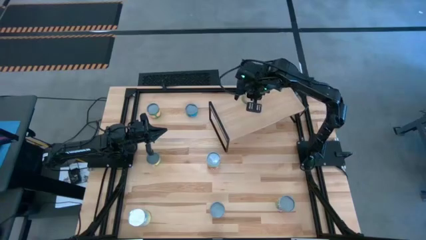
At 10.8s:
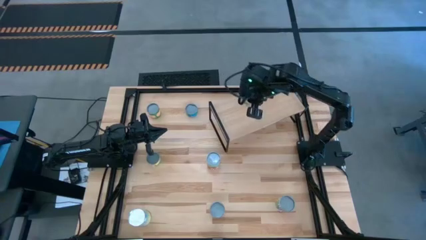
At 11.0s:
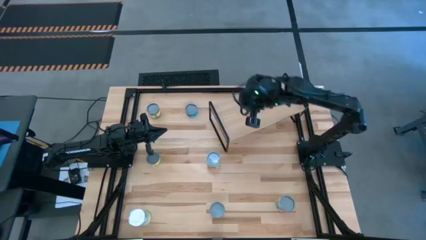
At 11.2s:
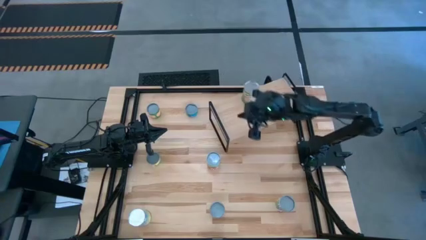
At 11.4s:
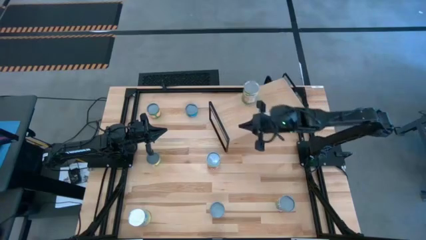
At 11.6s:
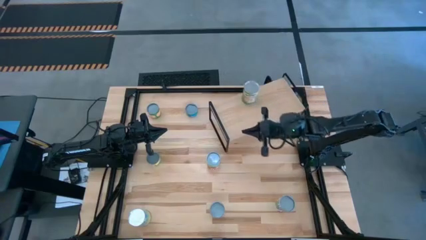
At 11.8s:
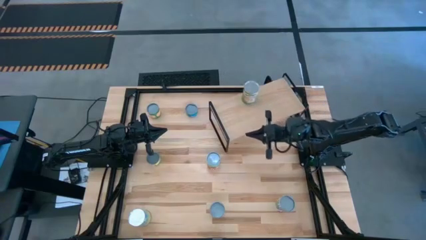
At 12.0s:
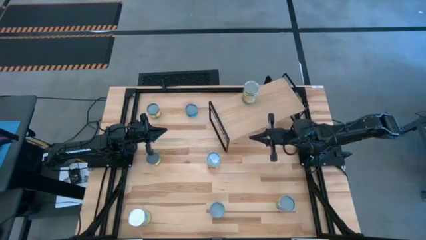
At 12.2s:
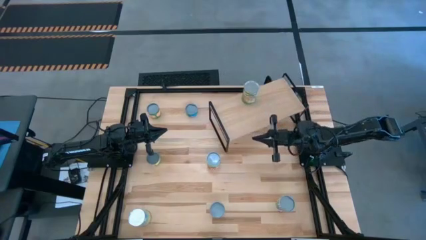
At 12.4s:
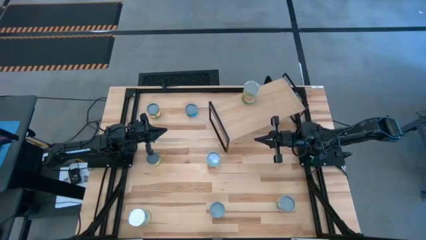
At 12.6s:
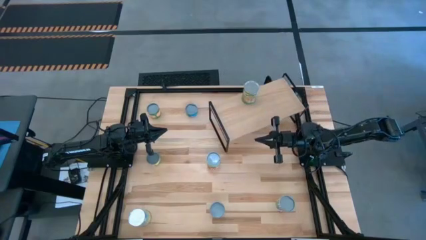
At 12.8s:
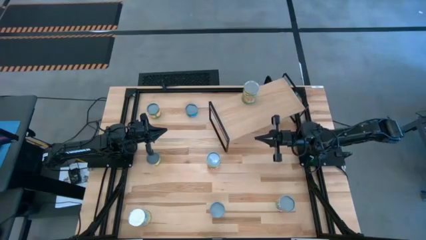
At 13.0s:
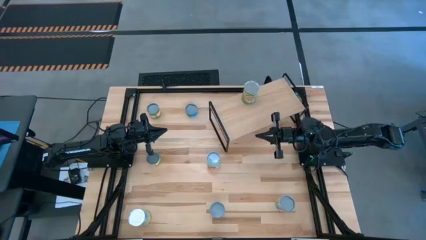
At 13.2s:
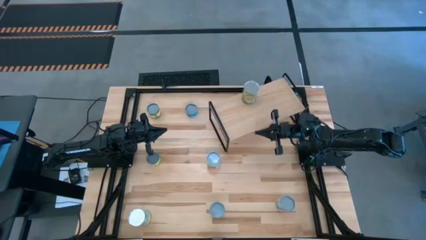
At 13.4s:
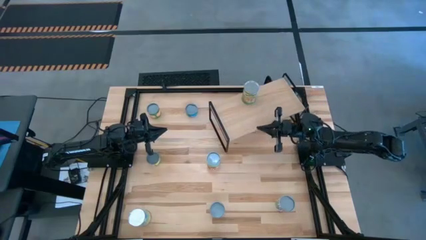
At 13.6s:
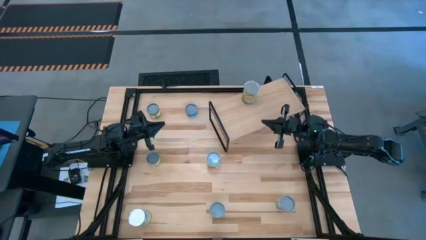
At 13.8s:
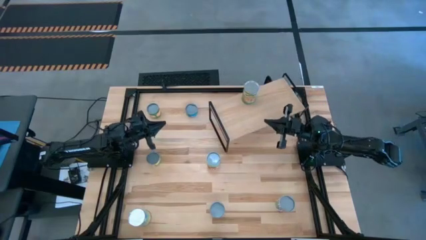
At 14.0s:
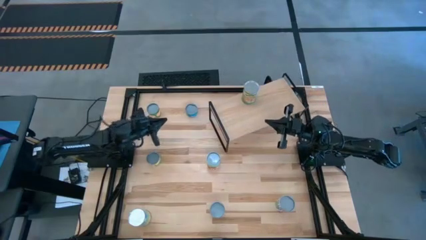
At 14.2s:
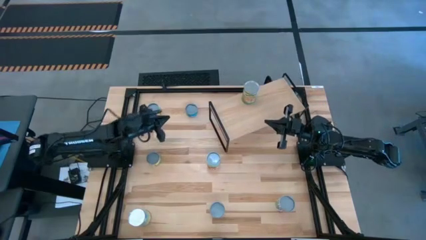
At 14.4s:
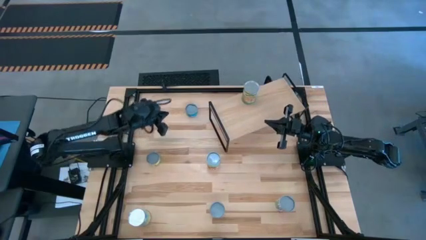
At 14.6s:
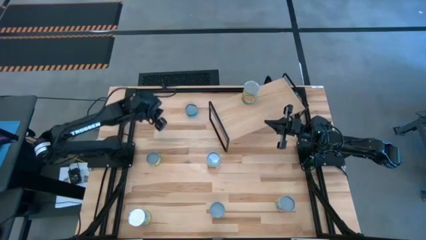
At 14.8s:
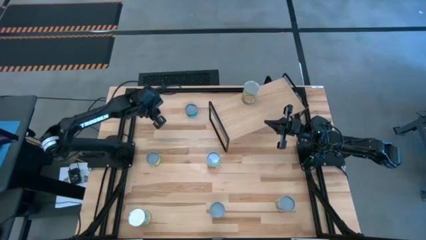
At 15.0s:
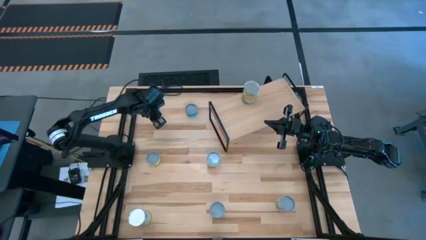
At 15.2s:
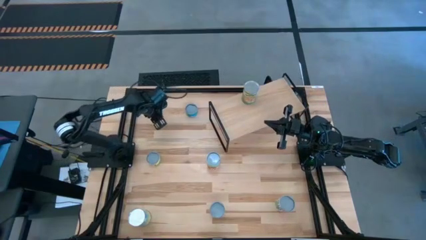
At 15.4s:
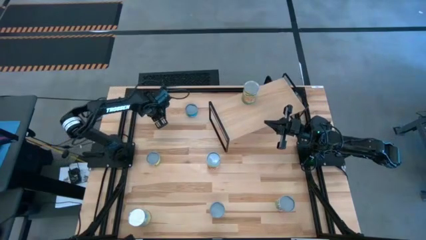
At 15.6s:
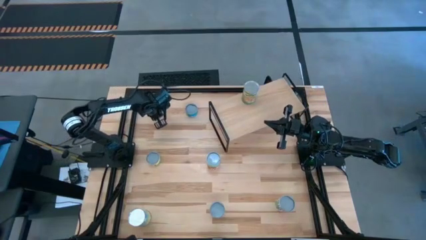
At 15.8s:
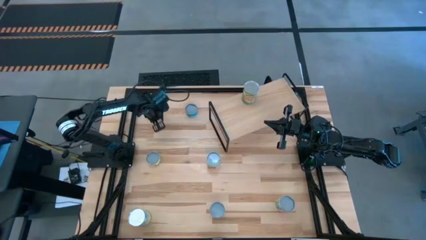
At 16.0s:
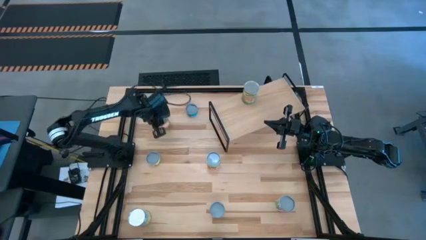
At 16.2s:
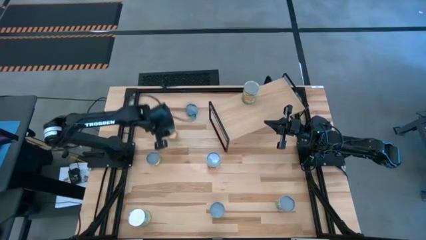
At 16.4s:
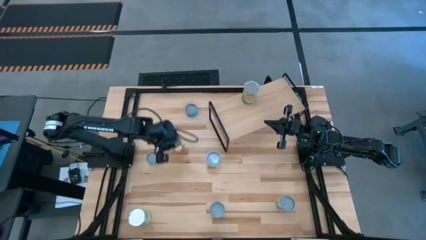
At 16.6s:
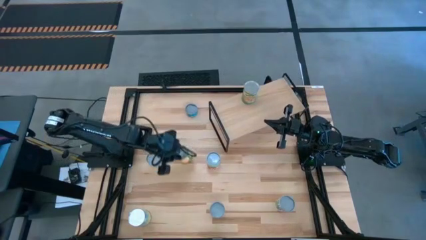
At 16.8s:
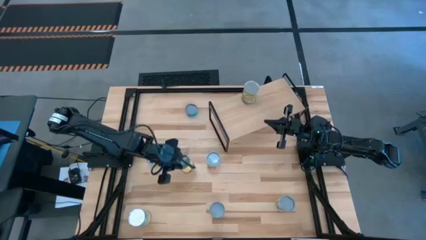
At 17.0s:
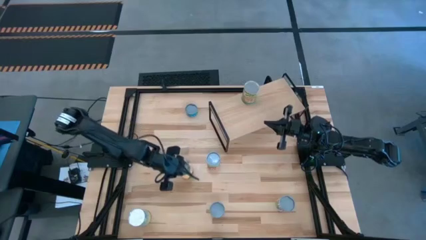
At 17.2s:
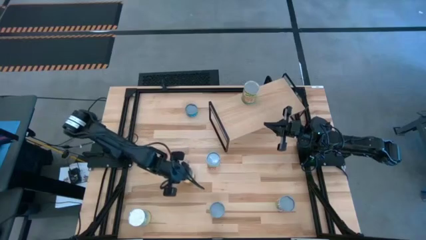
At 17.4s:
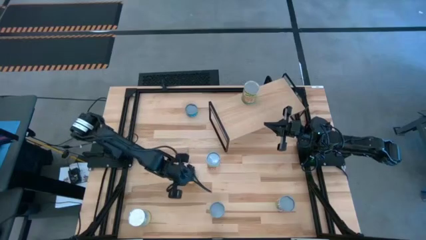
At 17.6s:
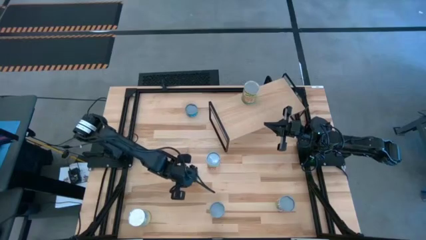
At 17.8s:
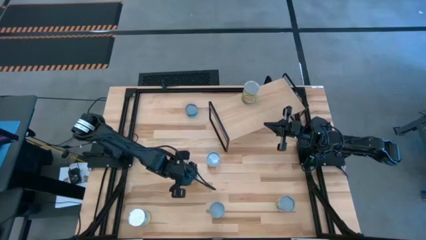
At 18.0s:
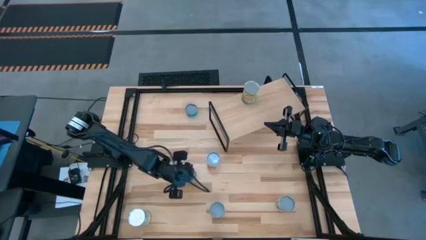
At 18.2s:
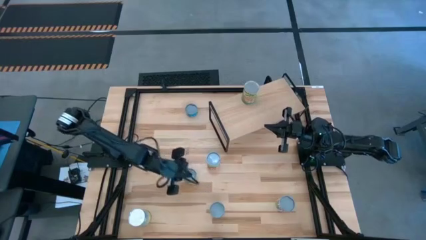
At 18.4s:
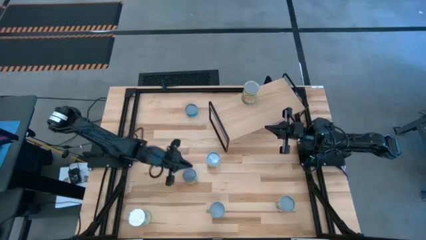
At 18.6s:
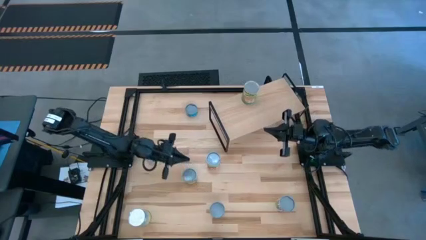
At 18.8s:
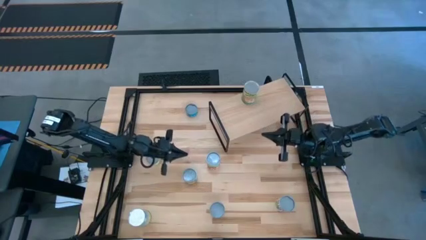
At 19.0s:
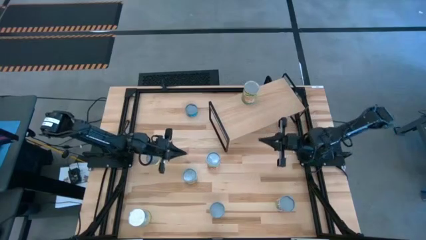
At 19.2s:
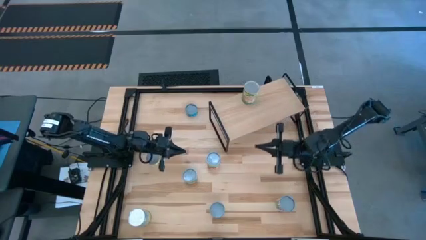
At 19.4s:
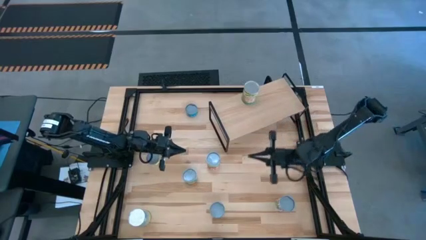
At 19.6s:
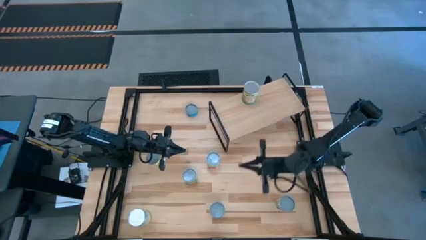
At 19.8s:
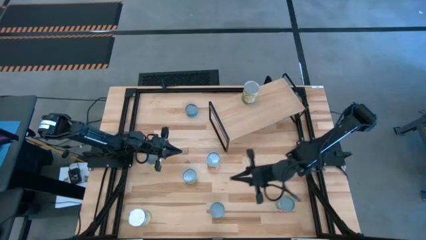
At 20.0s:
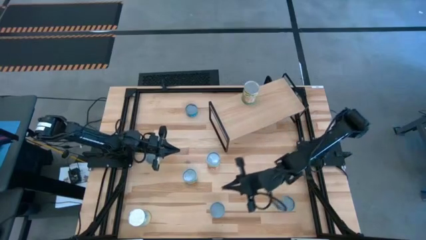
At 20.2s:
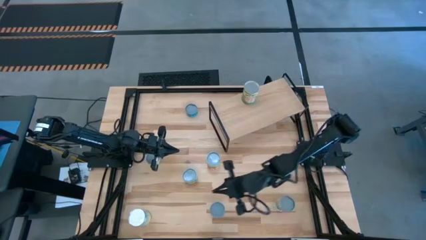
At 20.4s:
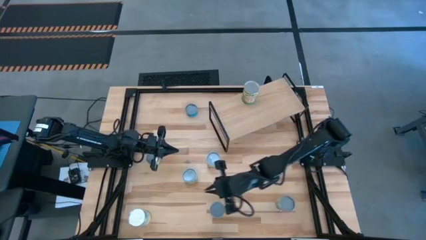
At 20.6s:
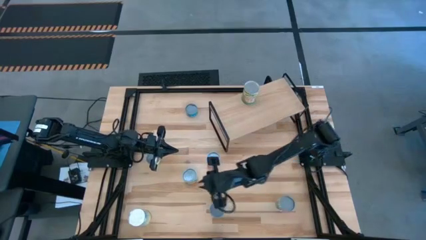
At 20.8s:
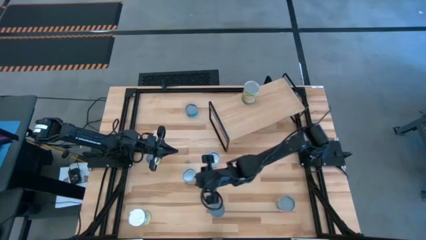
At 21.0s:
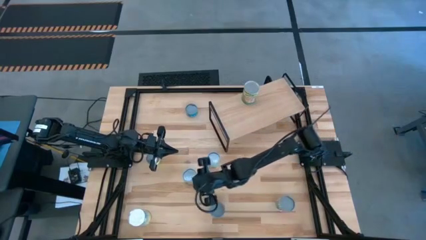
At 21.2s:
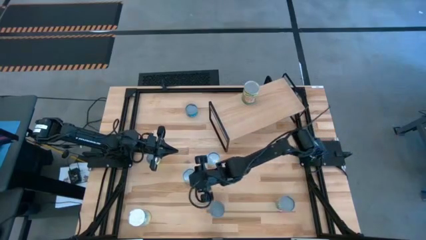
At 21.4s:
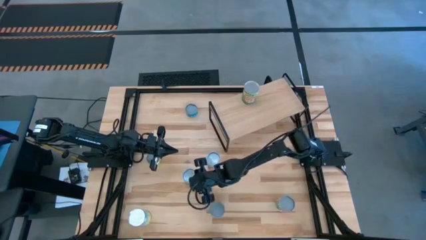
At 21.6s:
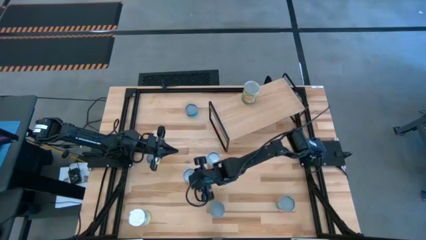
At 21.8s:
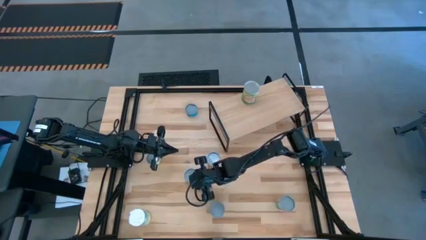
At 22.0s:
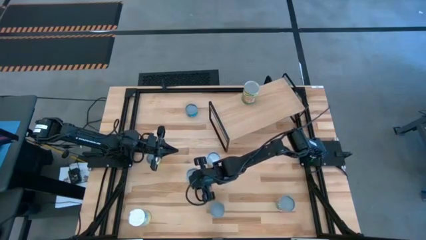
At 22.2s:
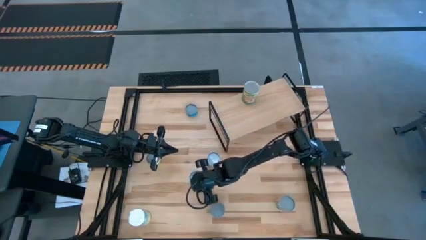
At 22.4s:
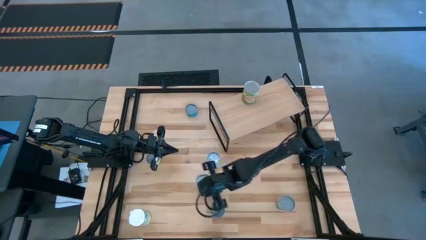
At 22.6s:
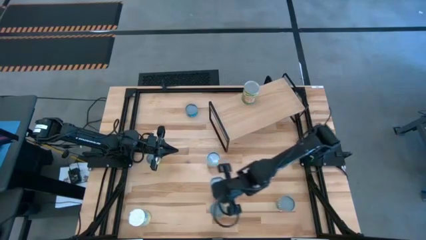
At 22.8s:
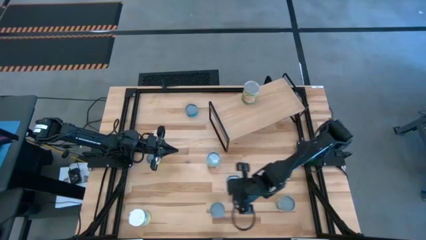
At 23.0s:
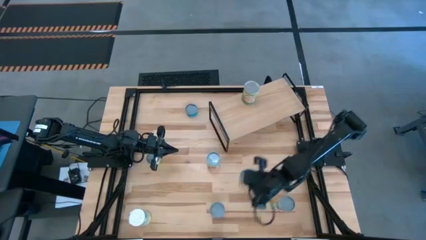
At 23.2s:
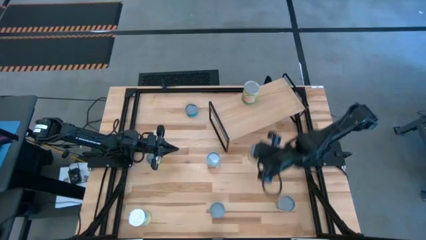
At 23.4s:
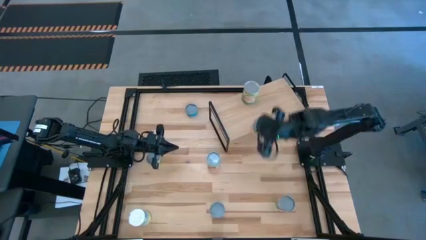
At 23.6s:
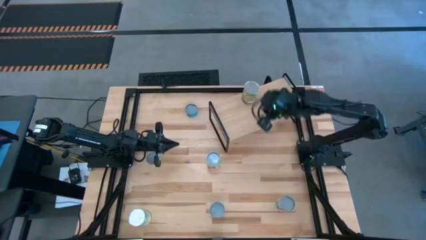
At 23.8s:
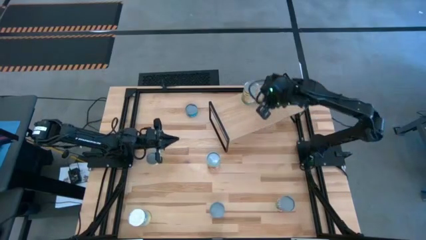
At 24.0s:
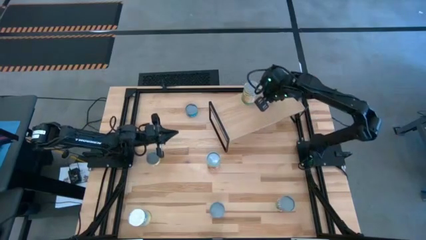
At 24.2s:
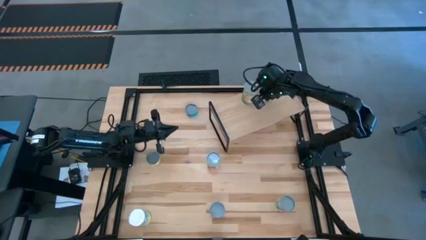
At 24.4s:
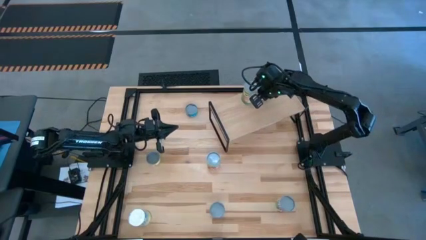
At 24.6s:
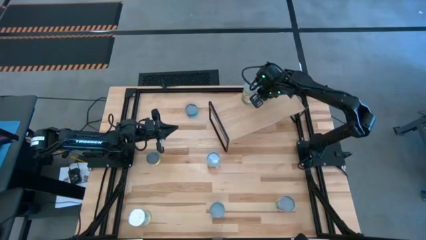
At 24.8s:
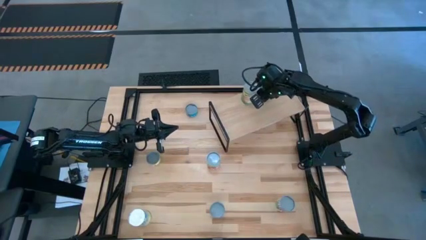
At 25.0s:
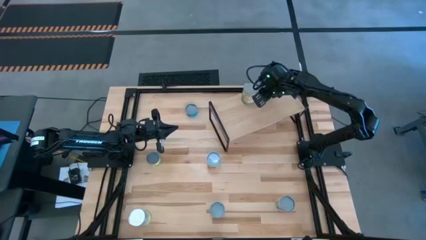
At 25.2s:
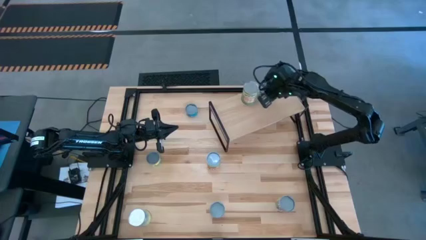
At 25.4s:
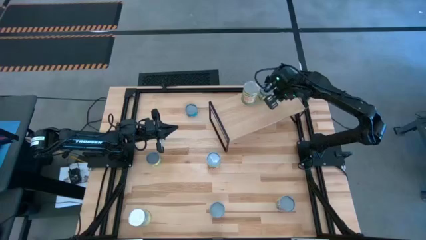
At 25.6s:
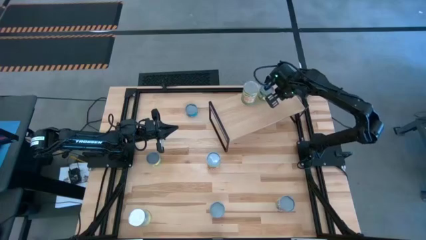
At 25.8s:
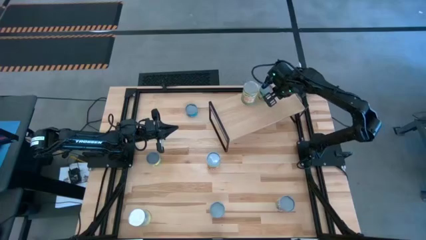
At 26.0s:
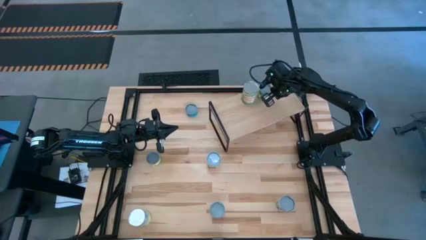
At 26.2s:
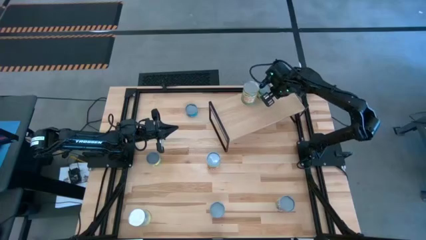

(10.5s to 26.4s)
Task: Pick and place cans onto a shelf
Put the canned peaches on the shelf
